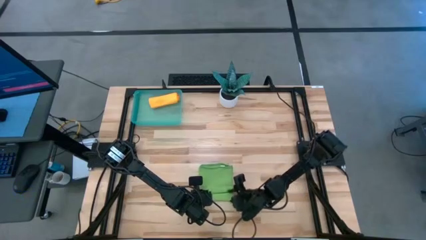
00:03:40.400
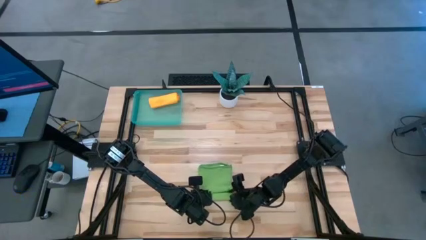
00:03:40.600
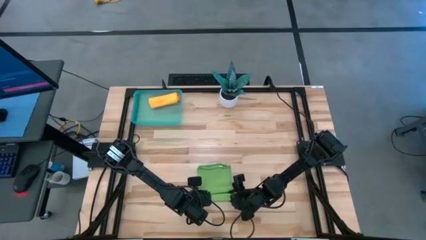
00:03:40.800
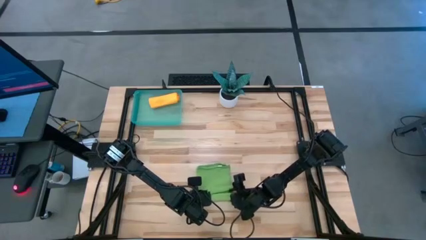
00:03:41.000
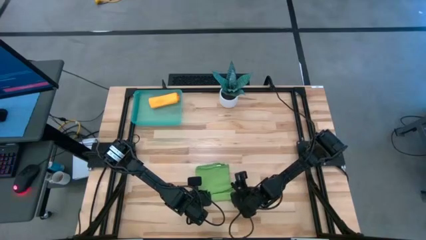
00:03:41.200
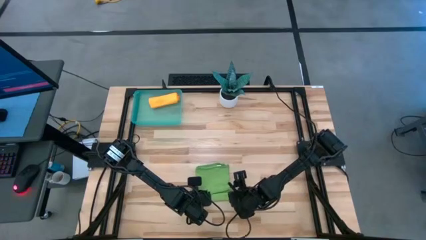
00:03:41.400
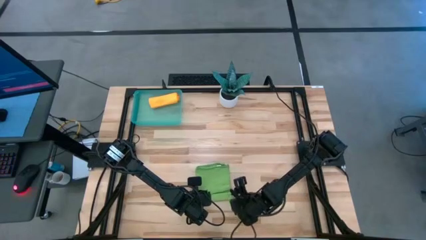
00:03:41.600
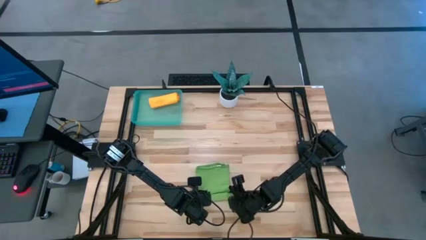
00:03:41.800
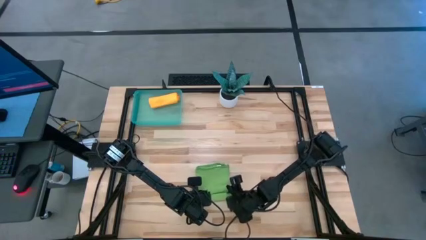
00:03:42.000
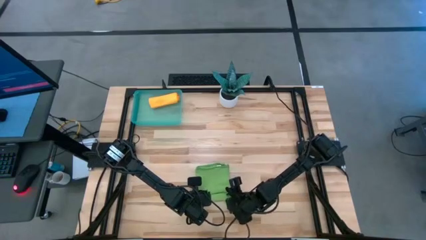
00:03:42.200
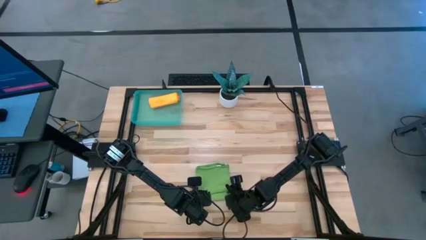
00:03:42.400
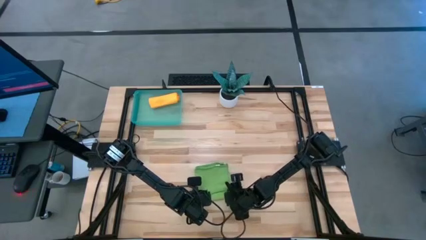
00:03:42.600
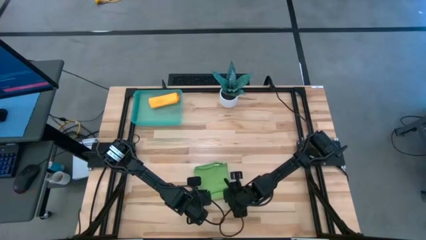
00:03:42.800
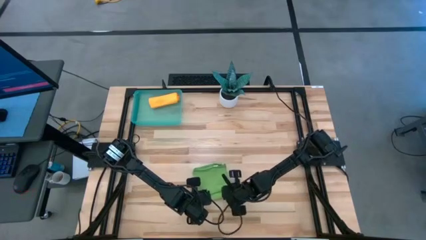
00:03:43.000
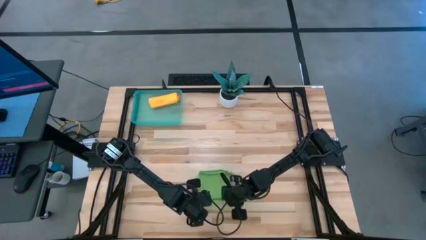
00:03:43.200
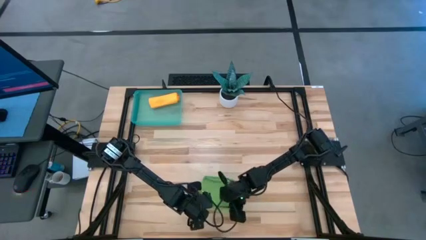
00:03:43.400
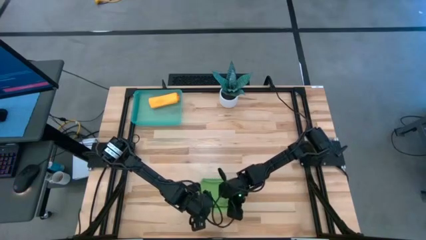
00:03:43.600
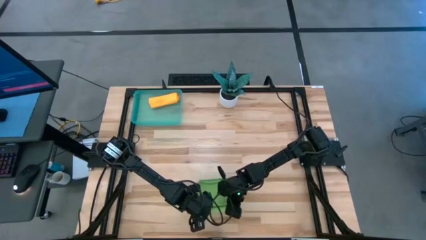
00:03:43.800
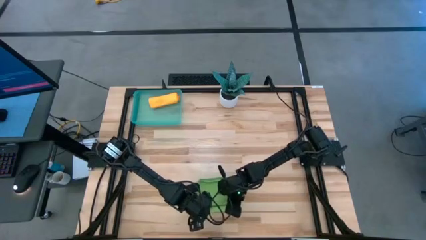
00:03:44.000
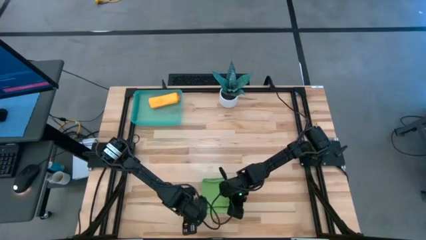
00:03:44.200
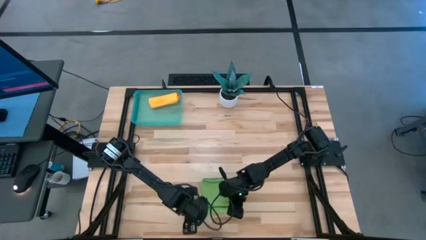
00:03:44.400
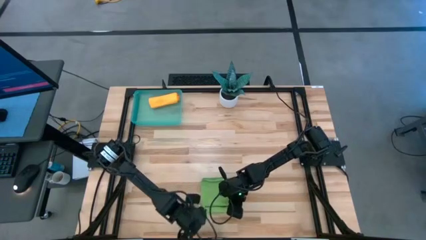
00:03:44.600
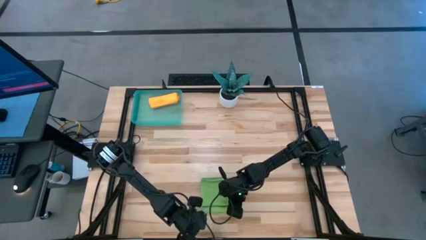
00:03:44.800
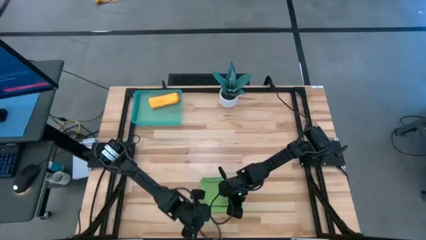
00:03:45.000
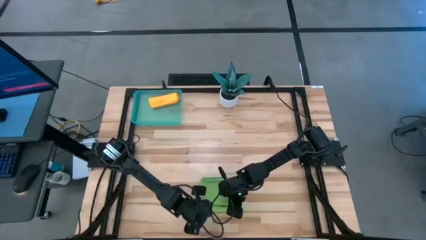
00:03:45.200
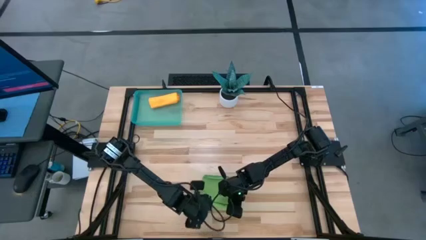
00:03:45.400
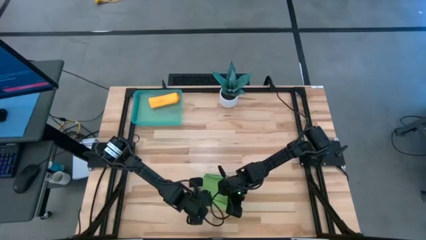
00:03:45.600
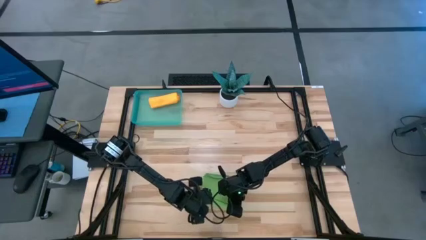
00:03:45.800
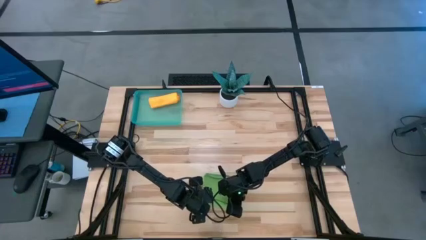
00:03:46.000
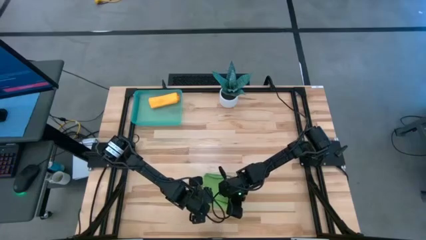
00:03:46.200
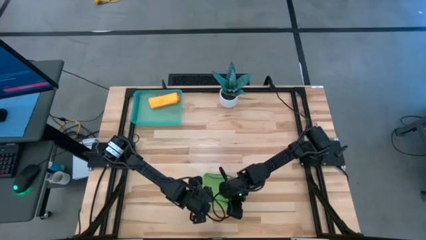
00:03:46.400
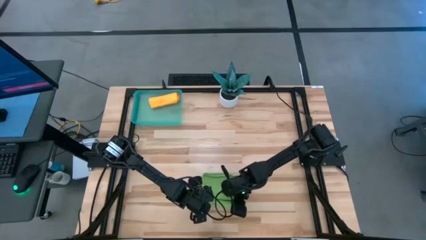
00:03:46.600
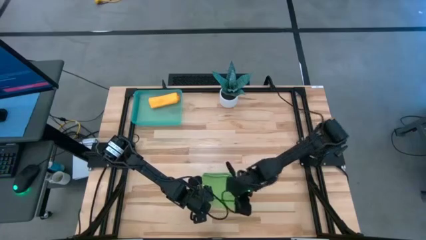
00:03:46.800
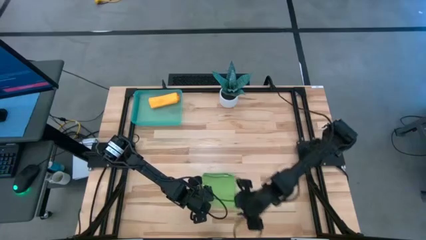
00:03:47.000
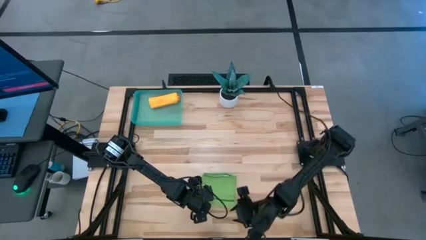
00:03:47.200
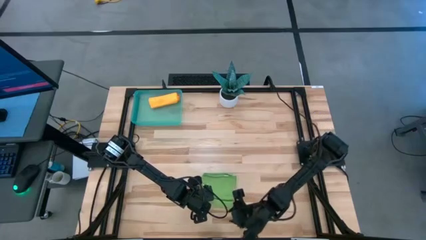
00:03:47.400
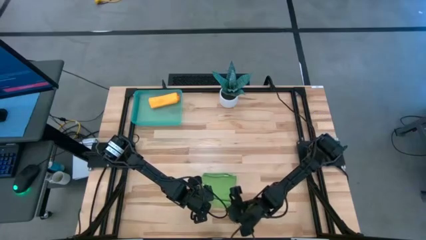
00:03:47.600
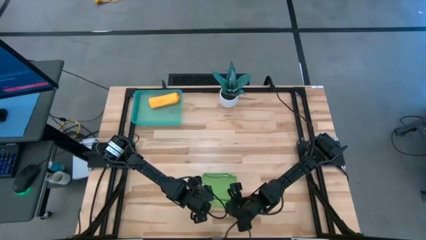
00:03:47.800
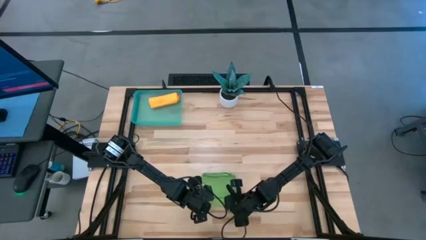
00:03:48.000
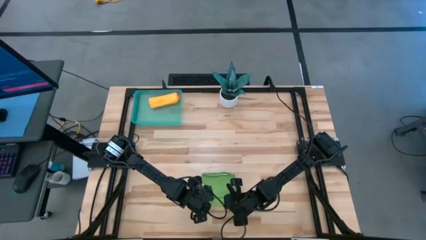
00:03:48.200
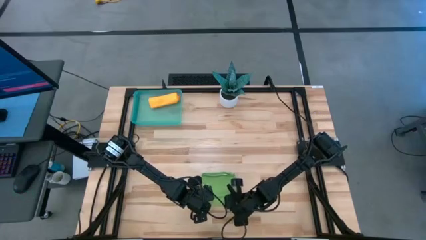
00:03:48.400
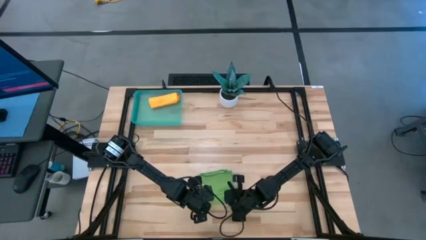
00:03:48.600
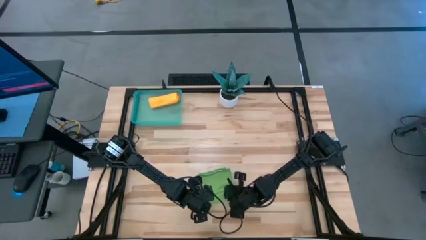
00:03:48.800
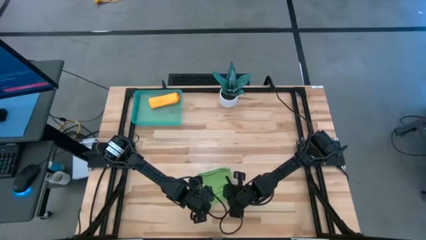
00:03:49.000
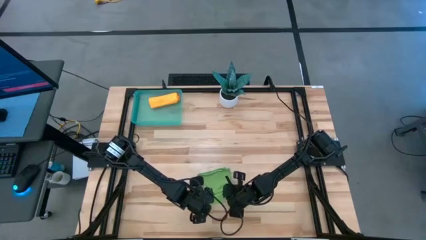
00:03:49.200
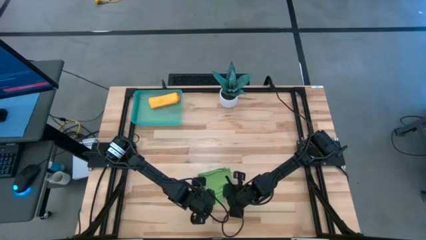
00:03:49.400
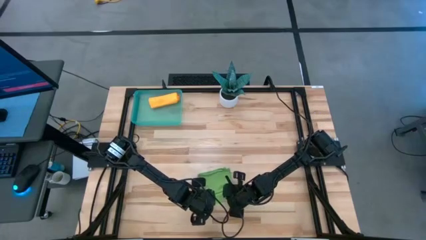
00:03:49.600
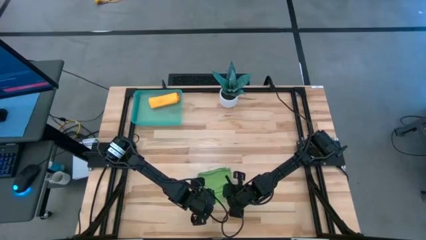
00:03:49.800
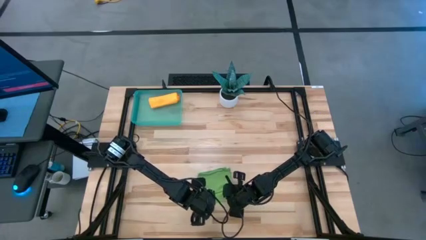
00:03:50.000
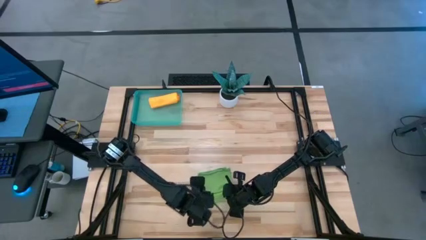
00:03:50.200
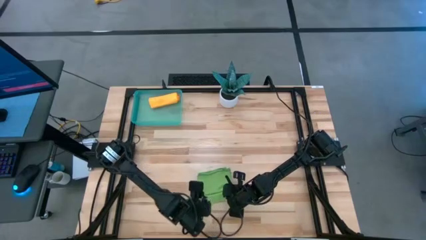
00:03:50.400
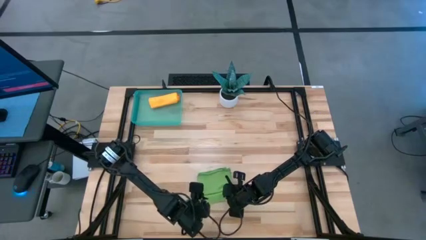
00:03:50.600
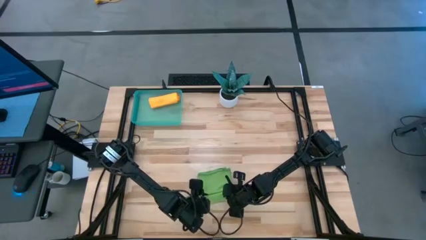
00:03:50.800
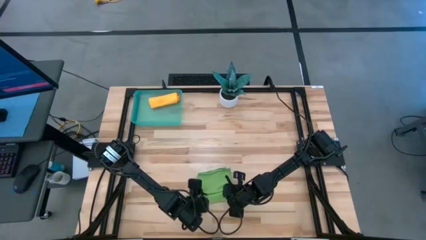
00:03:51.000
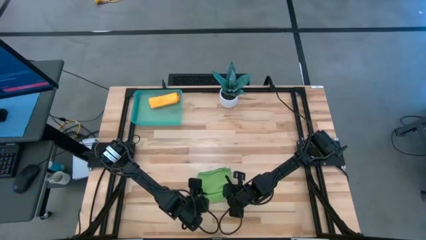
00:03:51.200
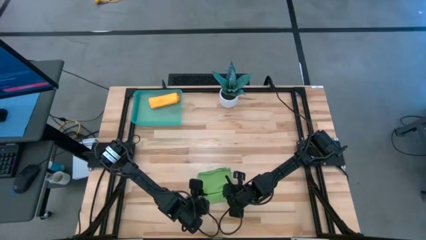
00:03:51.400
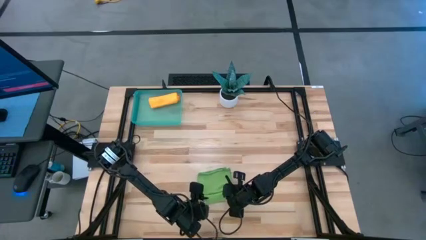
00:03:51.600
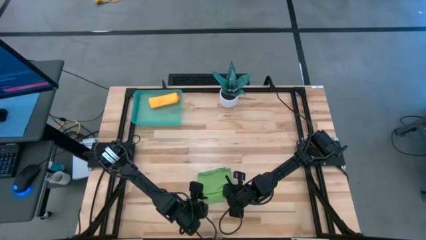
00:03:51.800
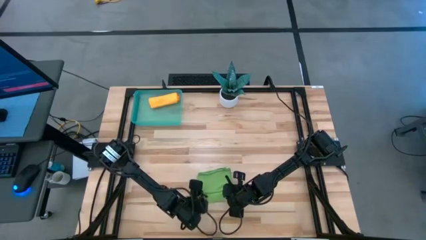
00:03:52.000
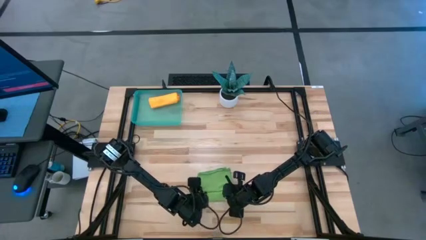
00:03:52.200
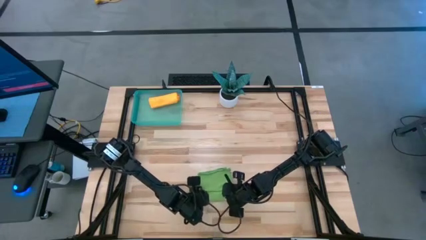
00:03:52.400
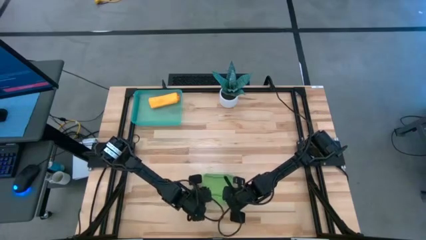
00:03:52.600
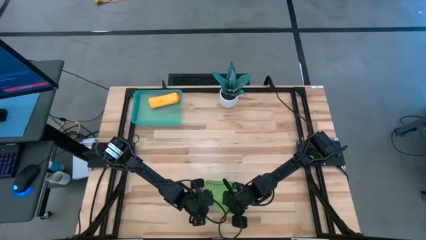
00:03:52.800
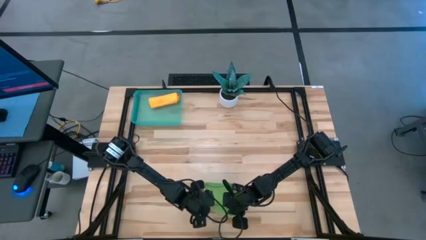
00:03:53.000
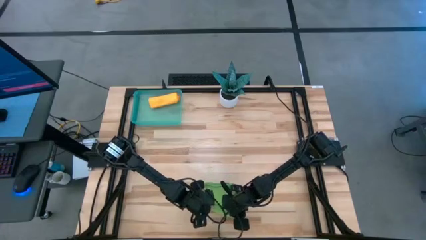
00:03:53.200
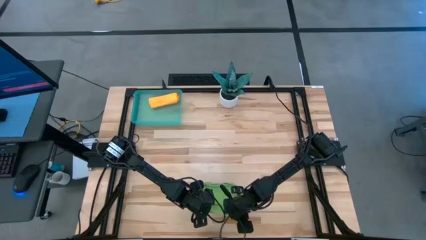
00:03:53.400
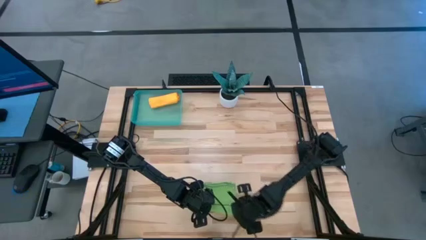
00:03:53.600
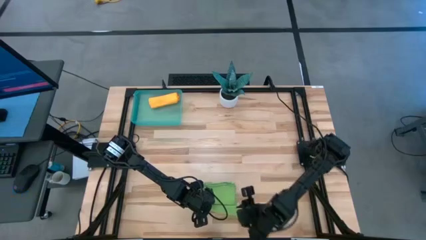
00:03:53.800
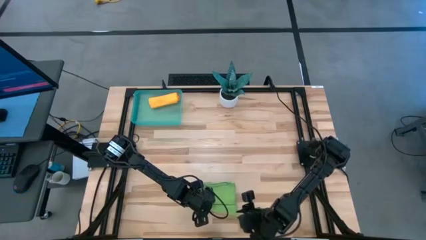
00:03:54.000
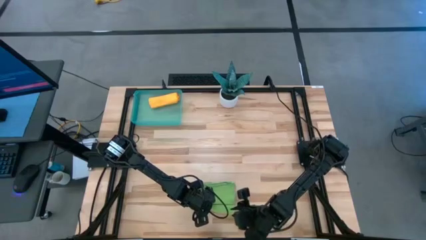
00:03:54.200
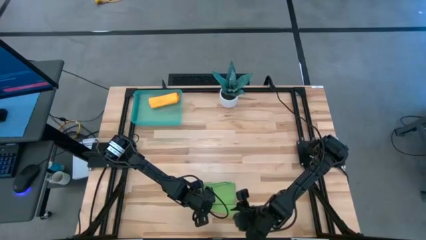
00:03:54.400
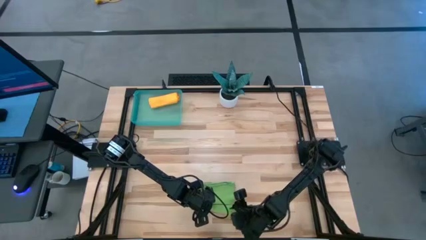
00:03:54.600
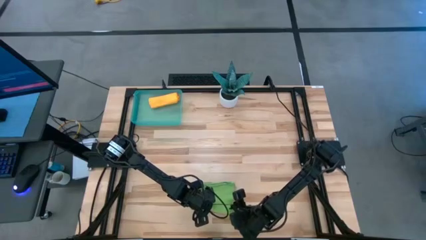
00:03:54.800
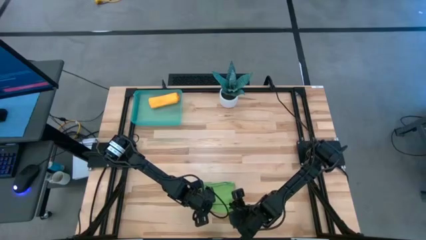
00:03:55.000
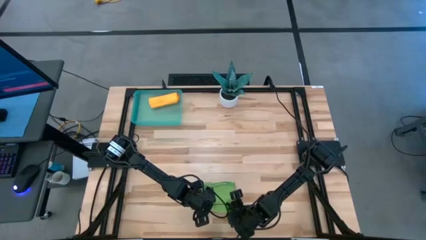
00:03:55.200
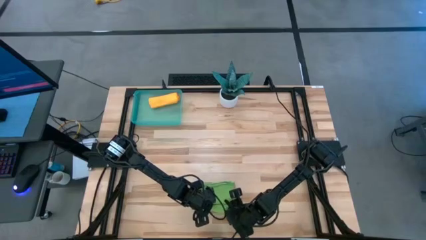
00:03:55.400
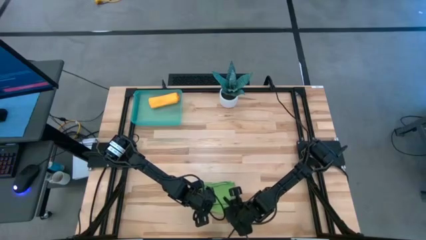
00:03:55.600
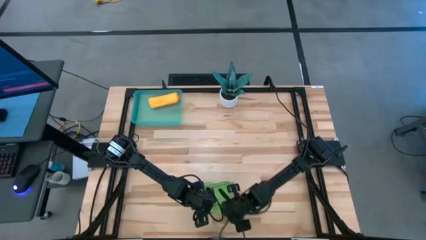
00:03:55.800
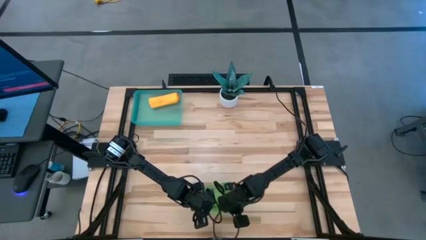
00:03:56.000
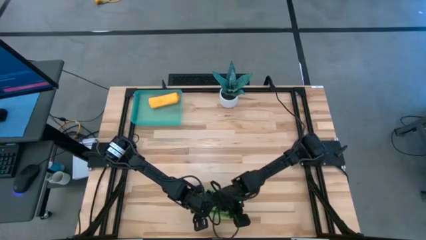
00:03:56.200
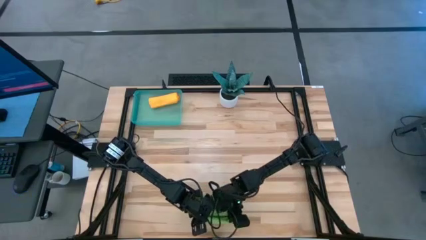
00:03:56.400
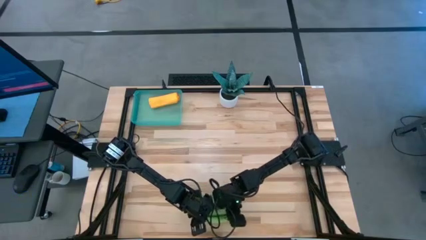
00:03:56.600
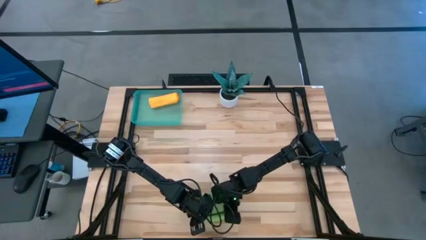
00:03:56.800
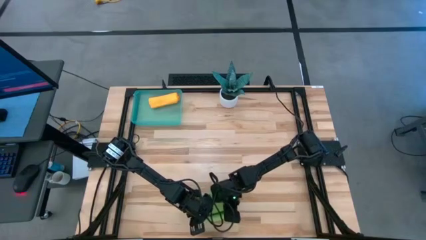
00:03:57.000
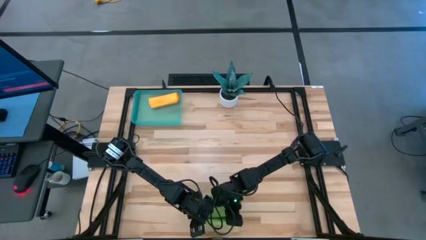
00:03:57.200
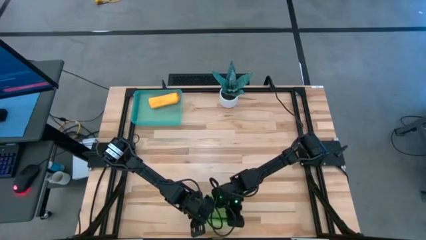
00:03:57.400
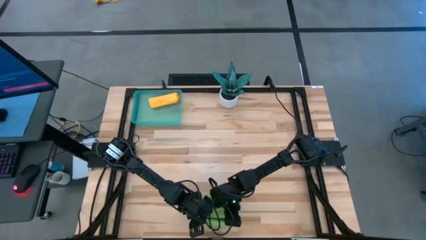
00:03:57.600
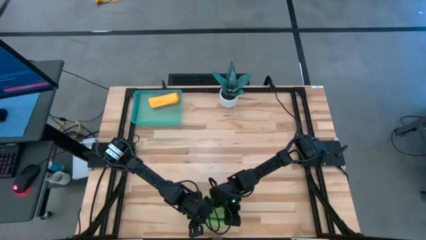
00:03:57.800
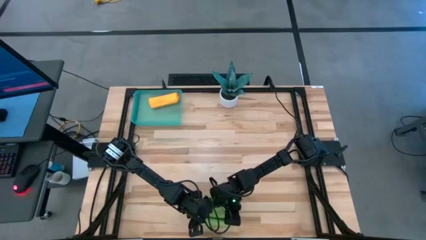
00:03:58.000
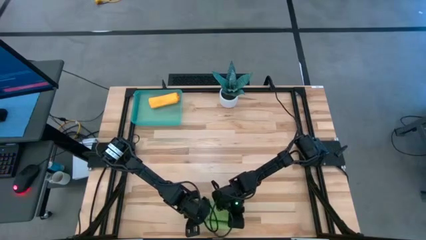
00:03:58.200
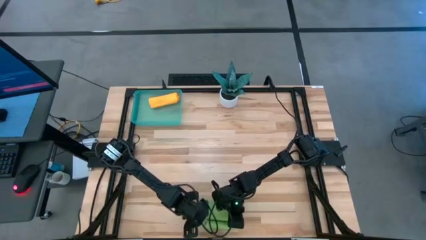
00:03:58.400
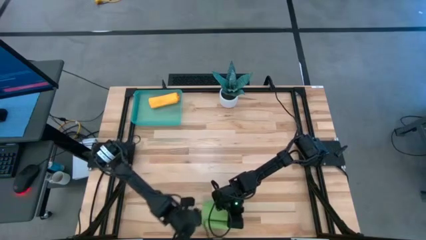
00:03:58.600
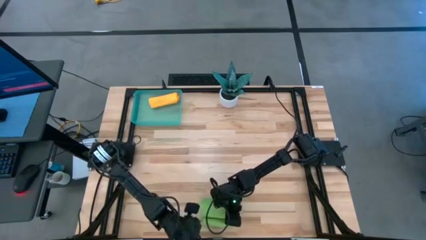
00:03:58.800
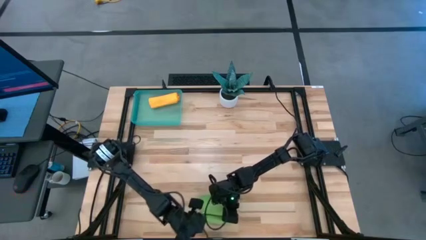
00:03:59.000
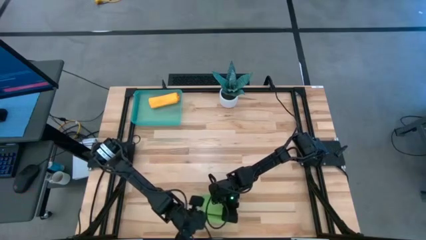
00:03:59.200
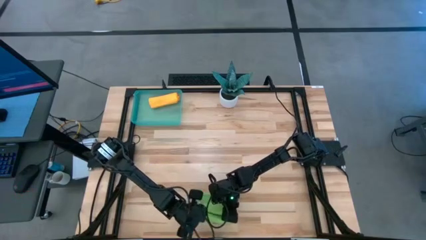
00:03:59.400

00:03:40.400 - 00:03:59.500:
Task: Roll microfiber towels into tight, uniform cylinder then place into a basket
Roll the light green microfiber cloth
